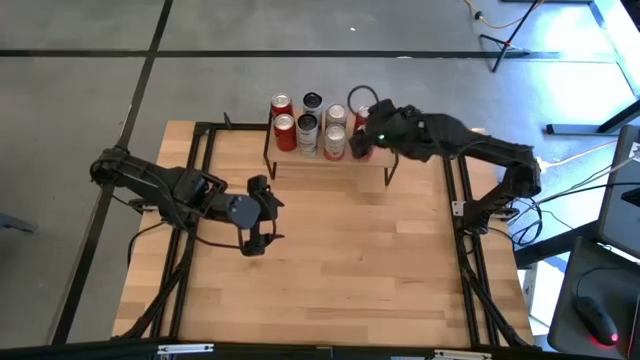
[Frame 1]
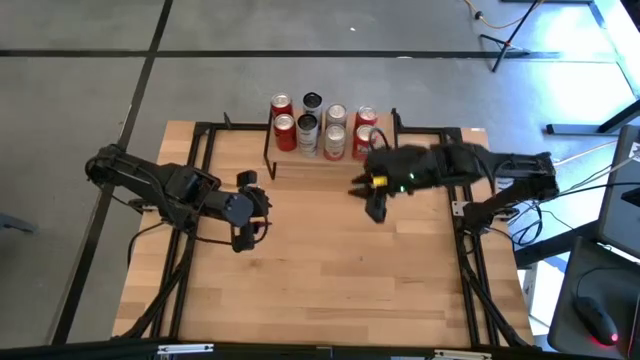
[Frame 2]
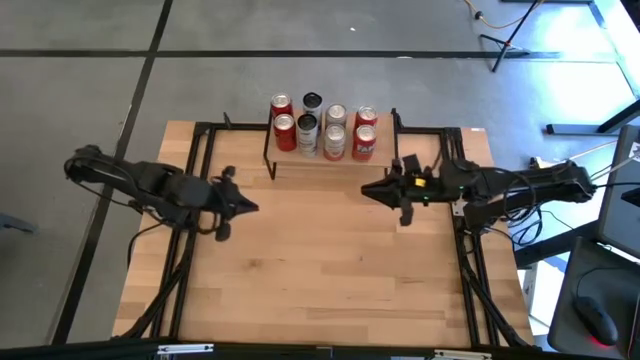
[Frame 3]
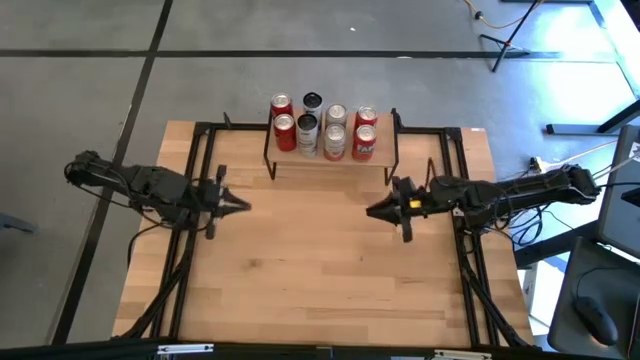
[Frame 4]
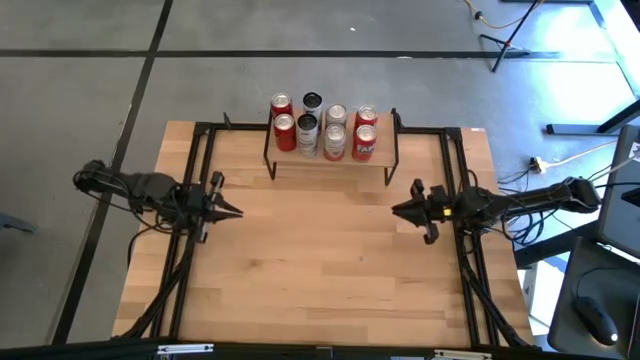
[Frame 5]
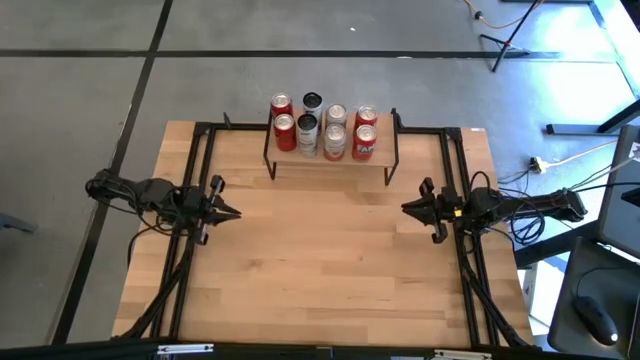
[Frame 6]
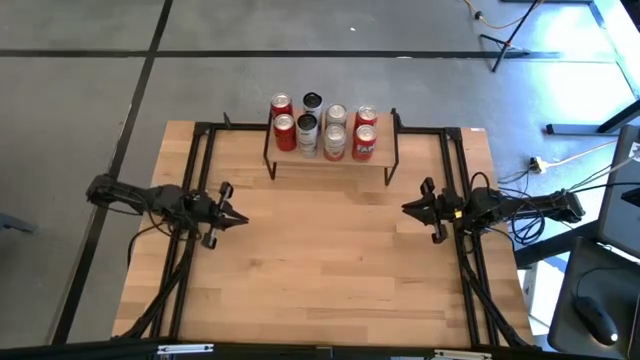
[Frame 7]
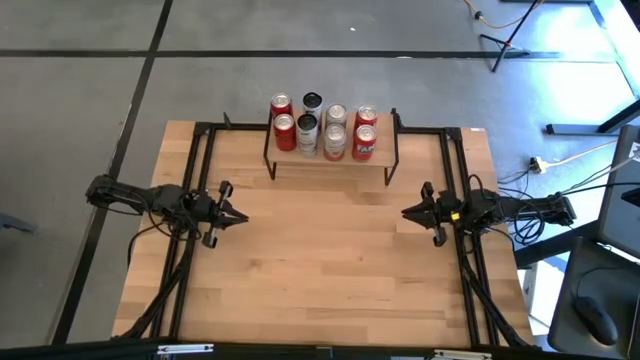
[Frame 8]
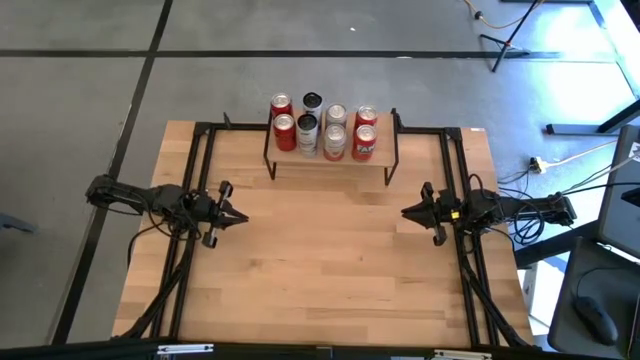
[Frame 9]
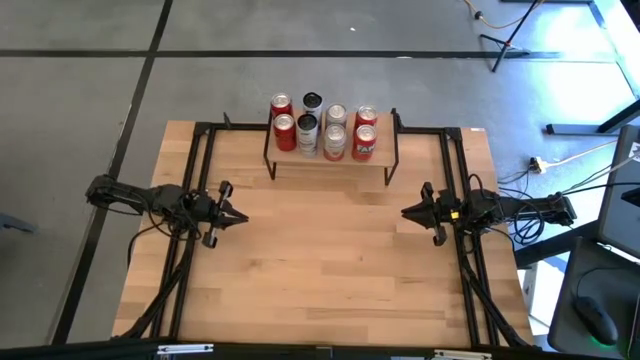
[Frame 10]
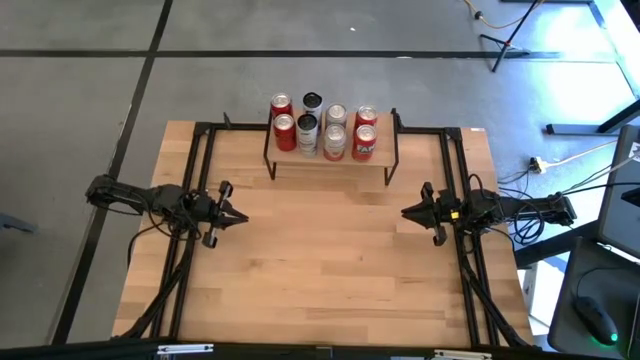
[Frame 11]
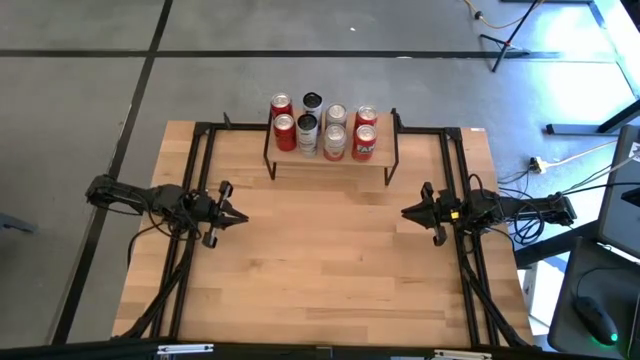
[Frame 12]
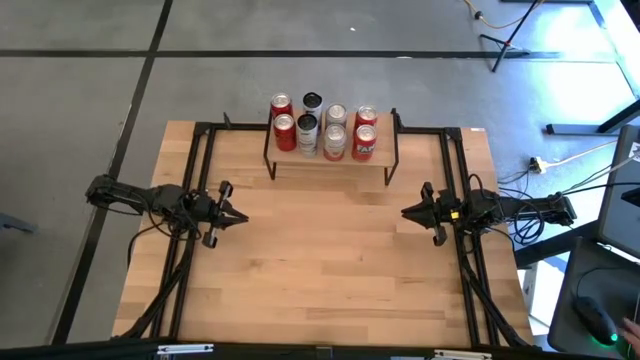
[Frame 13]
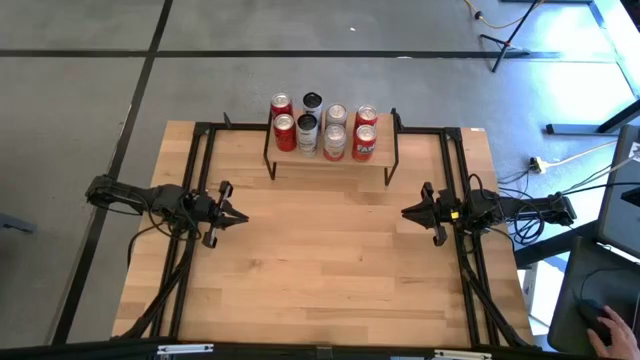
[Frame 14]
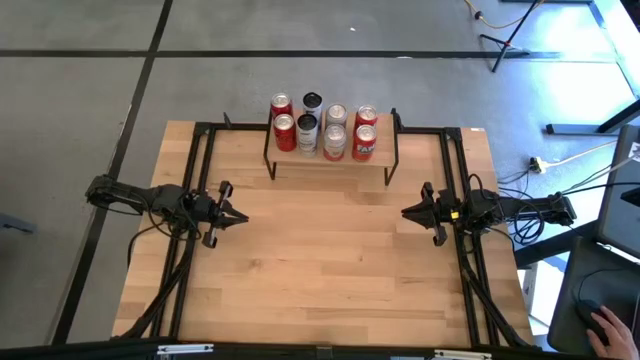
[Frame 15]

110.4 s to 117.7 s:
Task: Place canned beverage on shelf
Return to Home Position

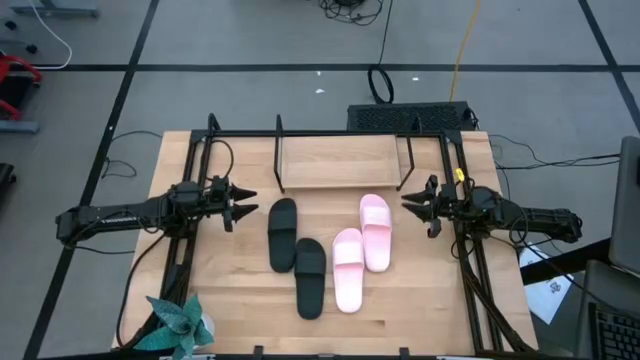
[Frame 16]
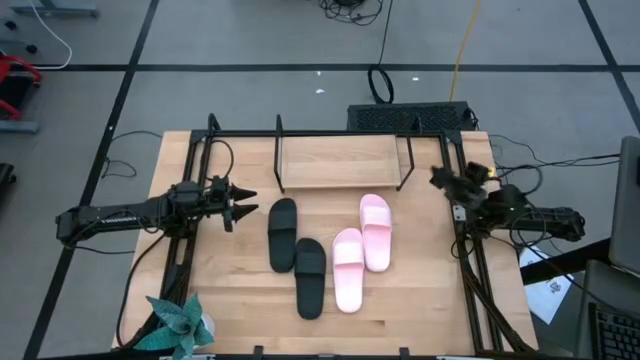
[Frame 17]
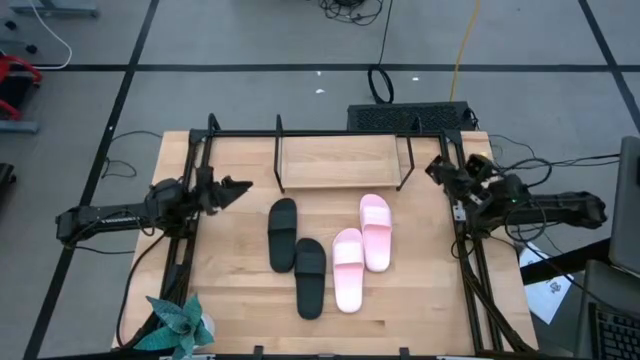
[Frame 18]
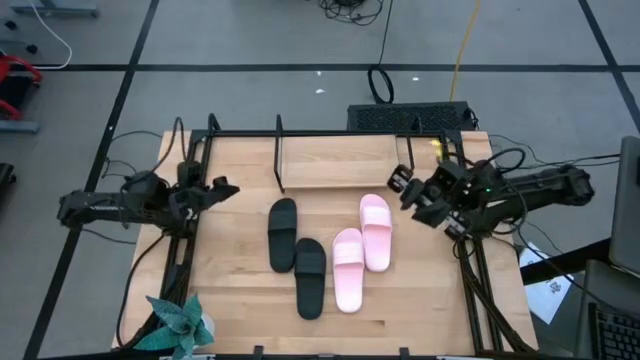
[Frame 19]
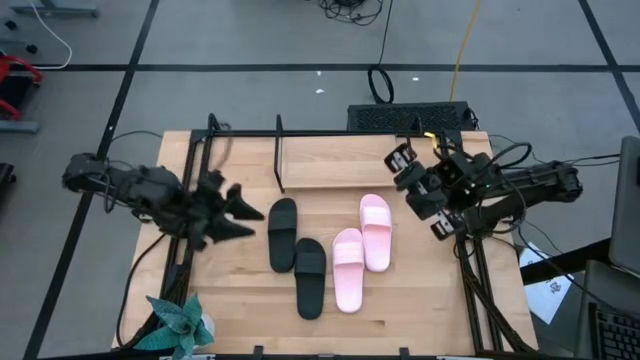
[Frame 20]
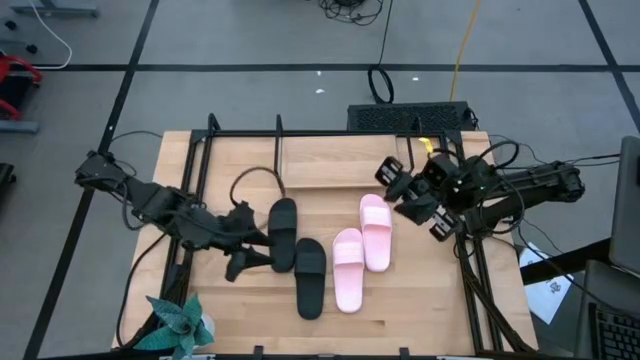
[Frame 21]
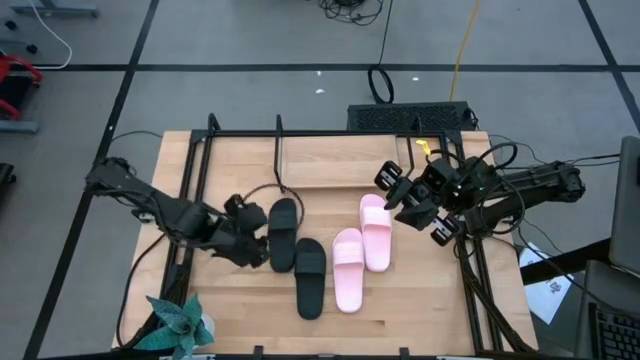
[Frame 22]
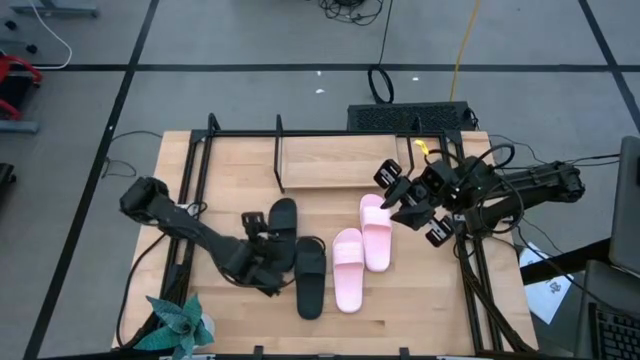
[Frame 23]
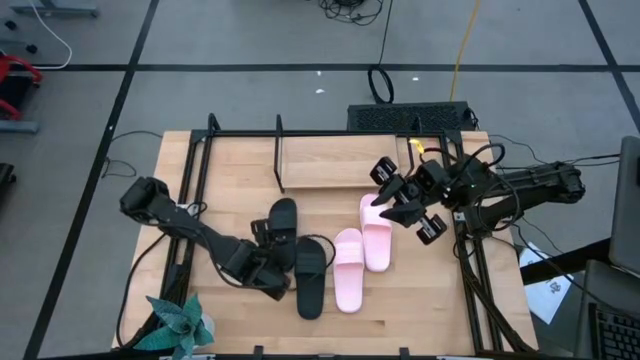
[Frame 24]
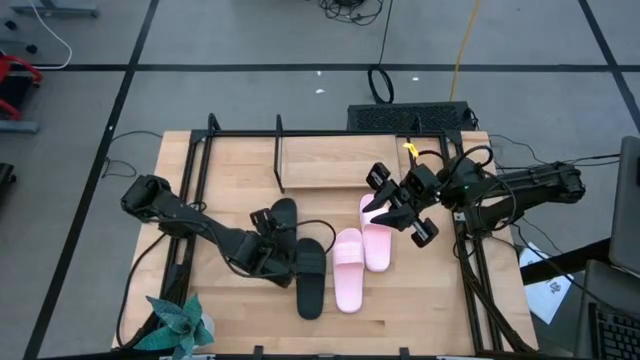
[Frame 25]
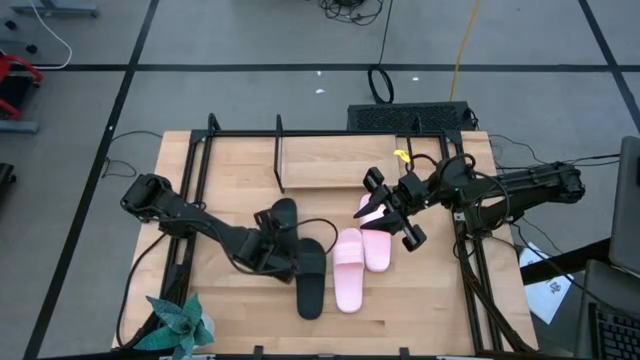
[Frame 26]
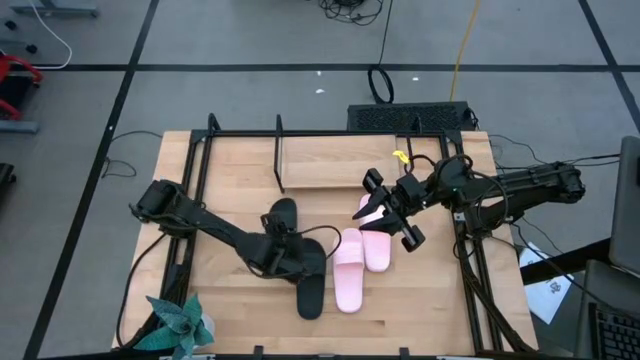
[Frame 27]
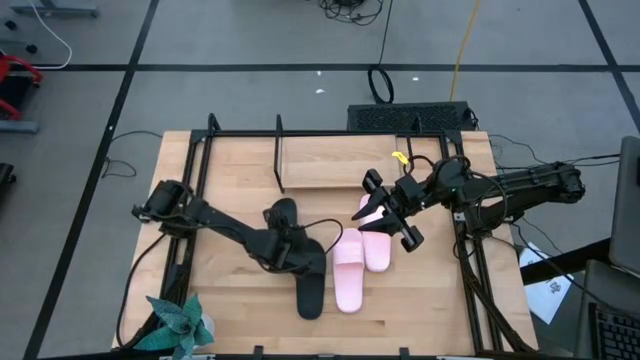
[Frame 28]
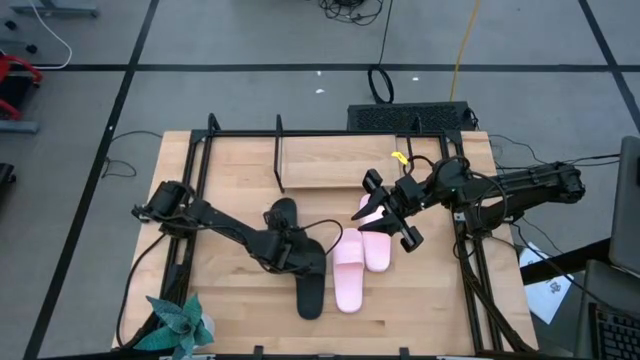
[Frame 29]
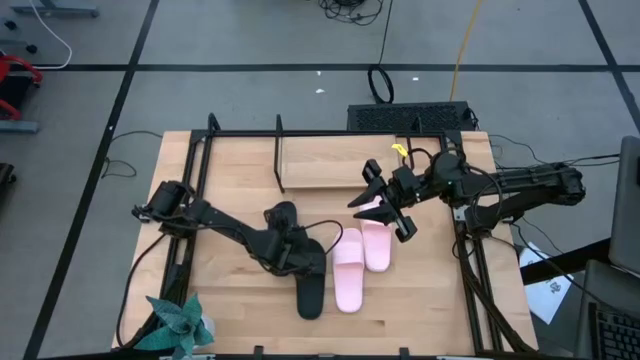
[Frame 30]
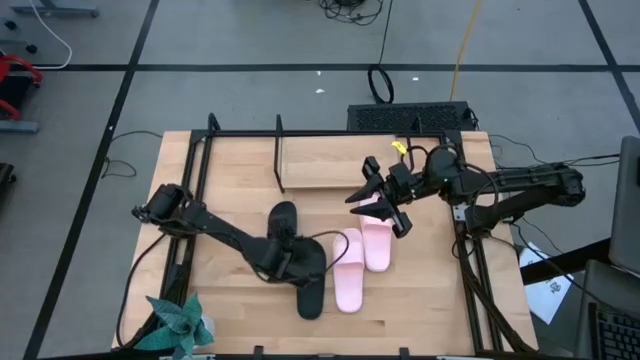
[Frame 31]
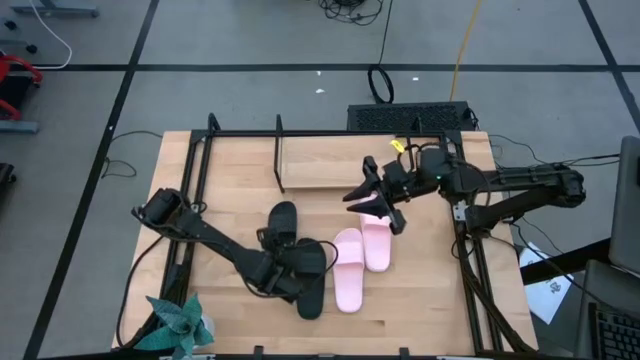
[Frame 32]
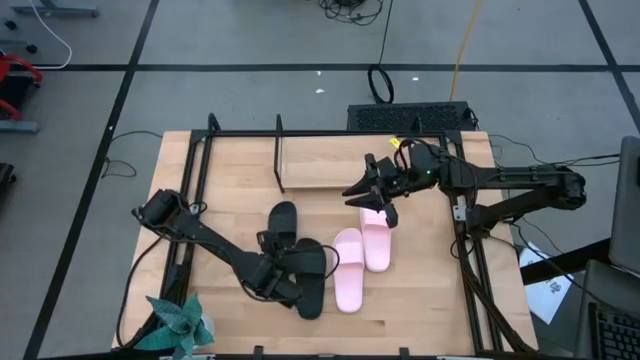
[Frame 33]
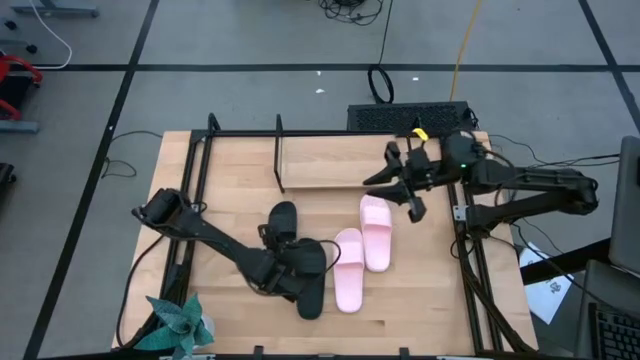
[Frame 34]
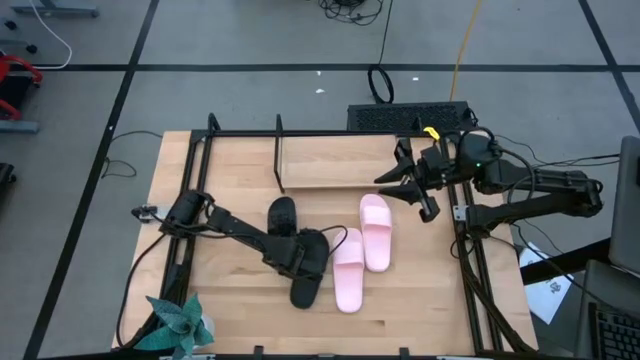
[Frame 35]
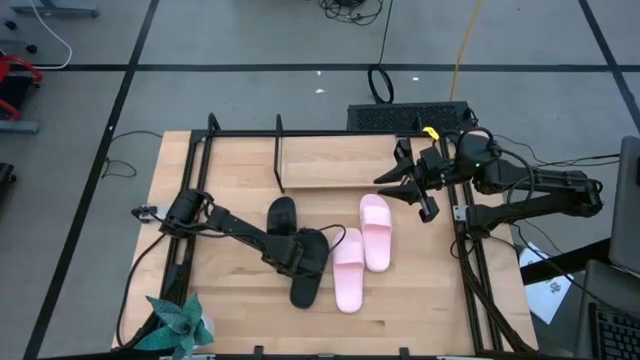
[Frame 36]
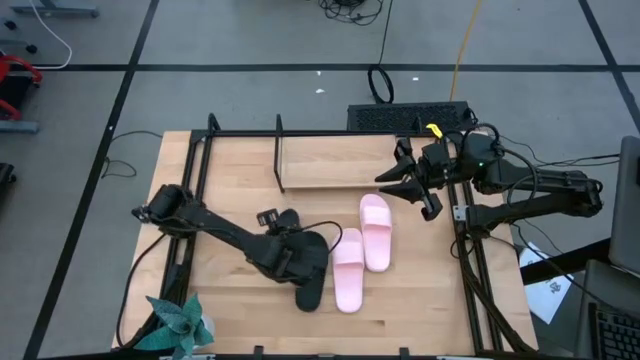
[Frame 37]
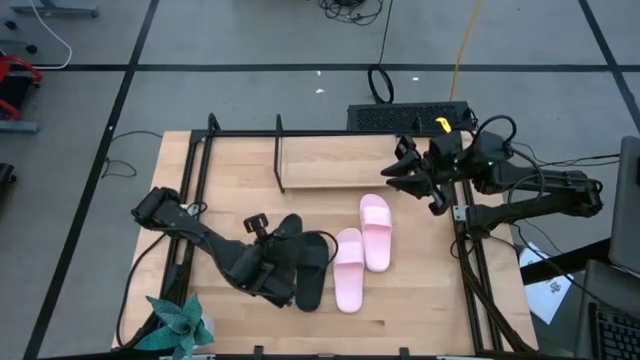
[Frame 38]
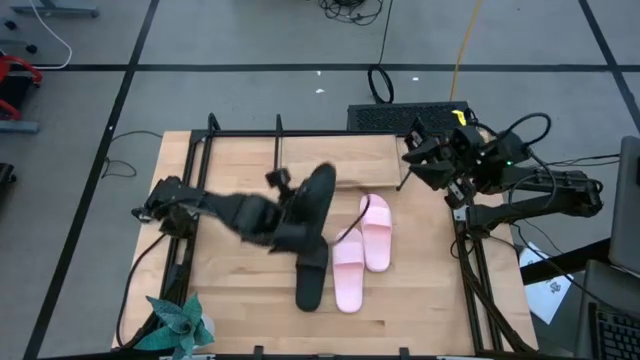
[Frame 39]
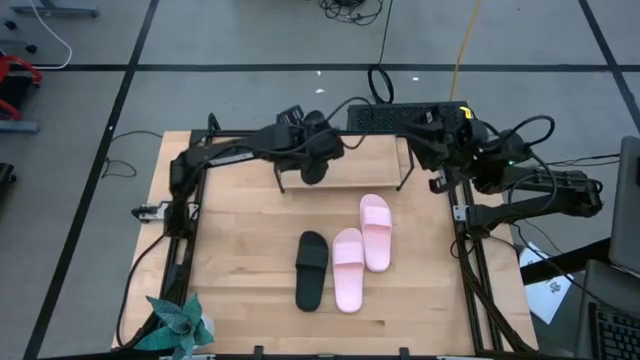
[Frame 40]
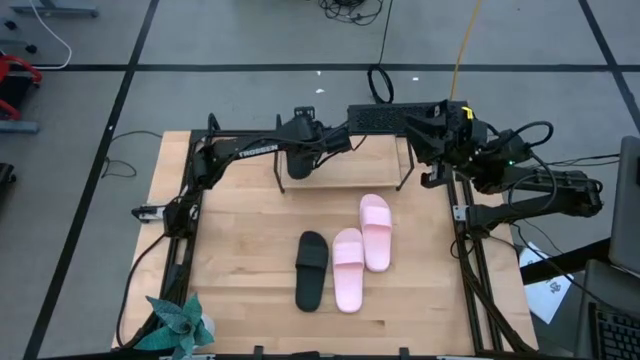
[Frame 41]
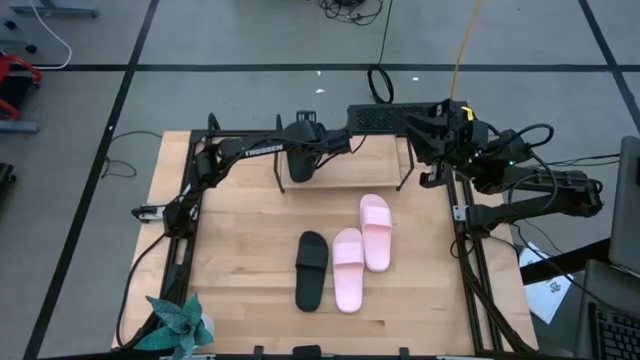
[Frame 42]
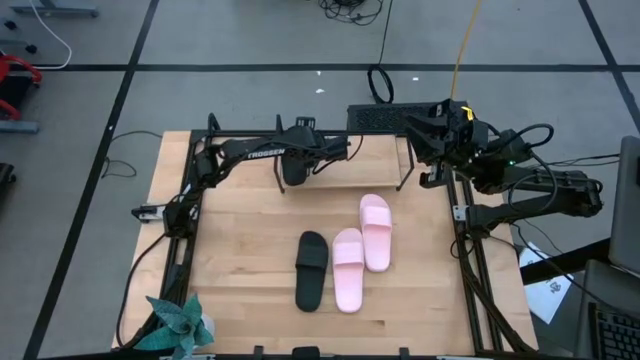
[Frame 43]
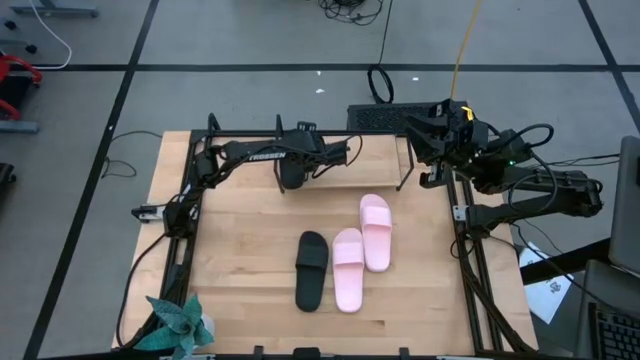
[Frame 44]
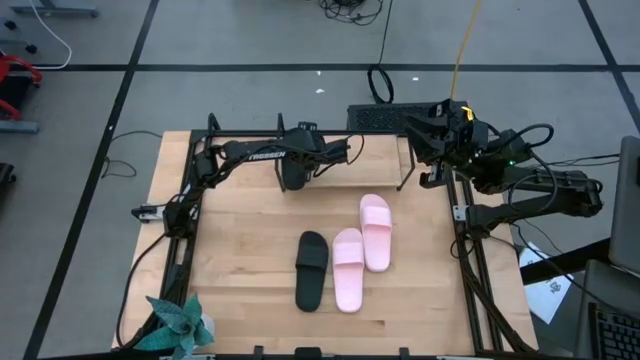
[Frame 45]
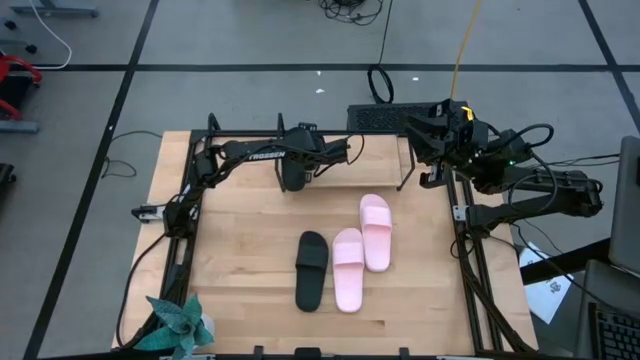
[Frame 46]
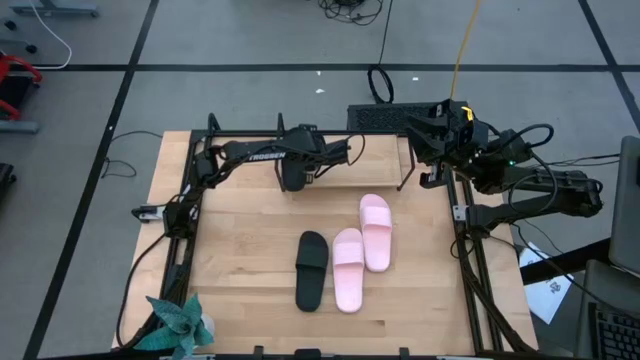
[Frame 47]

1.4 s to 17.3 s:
Task: Pick and place slides into the shelf
Put the top black slide on the shelf
